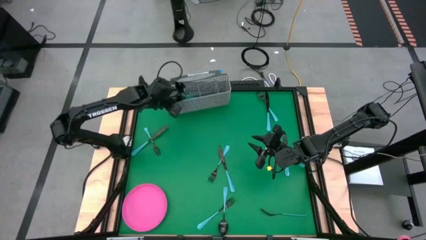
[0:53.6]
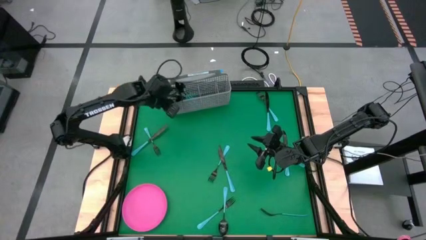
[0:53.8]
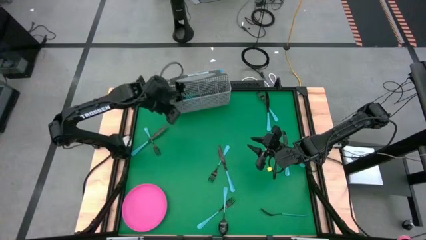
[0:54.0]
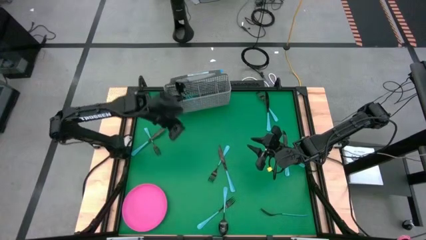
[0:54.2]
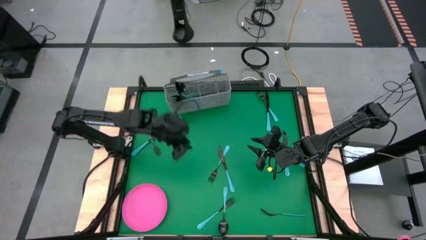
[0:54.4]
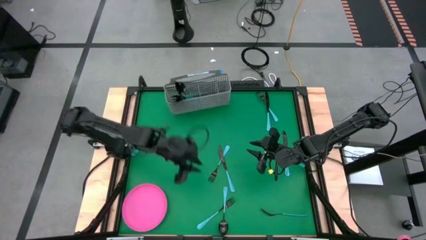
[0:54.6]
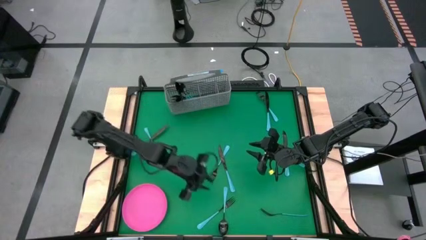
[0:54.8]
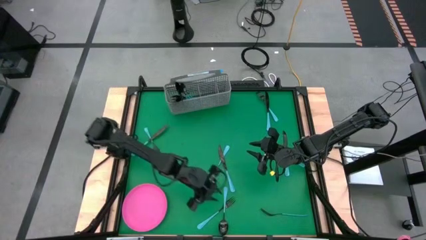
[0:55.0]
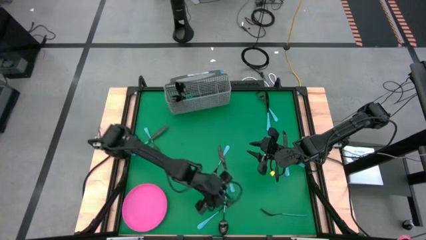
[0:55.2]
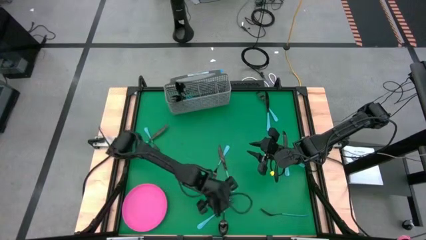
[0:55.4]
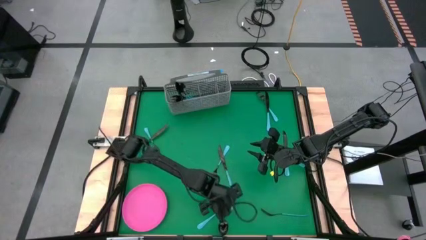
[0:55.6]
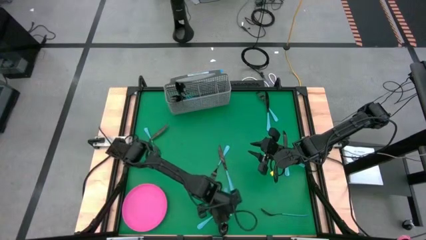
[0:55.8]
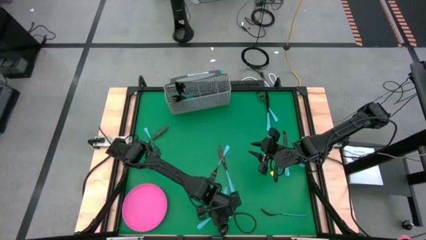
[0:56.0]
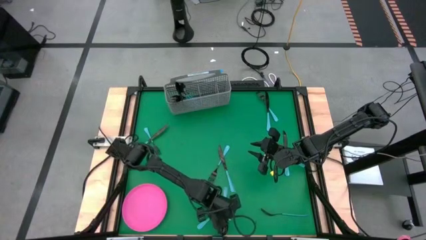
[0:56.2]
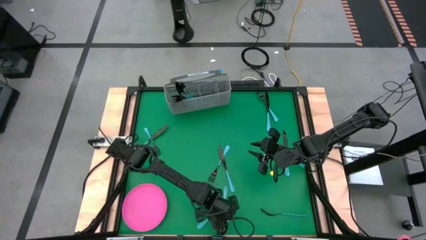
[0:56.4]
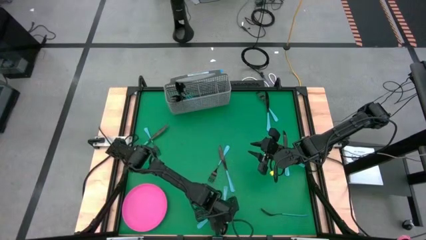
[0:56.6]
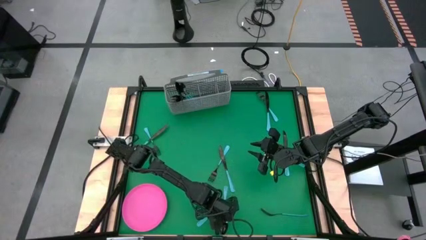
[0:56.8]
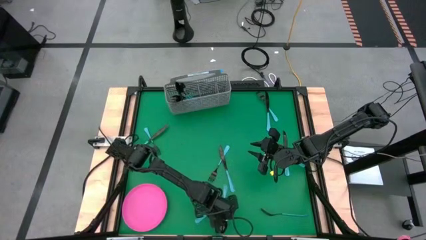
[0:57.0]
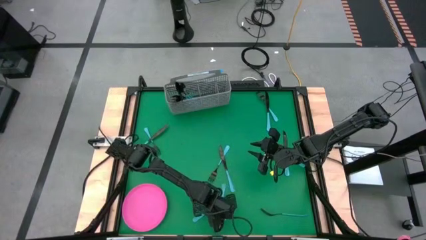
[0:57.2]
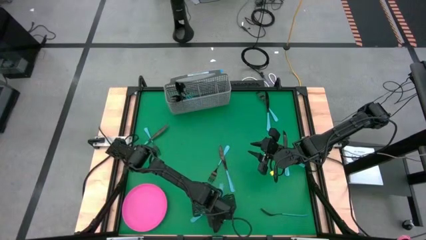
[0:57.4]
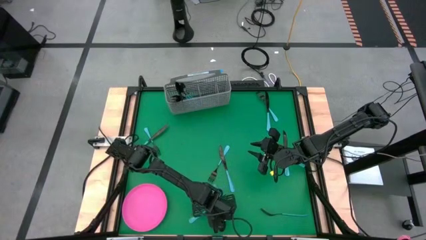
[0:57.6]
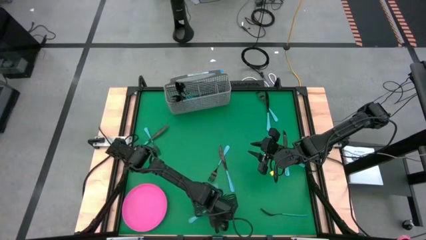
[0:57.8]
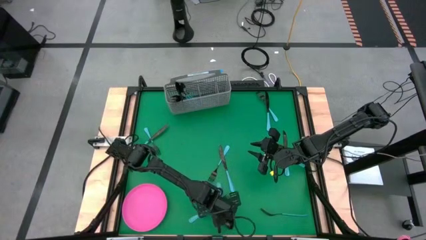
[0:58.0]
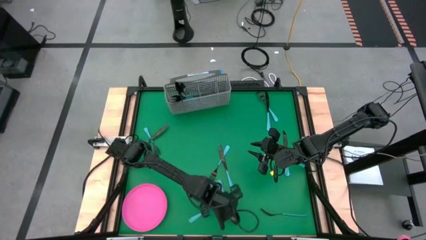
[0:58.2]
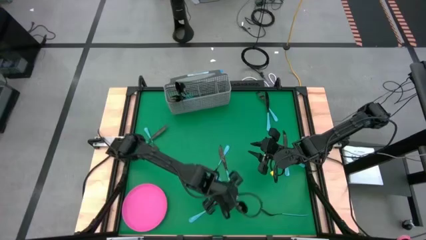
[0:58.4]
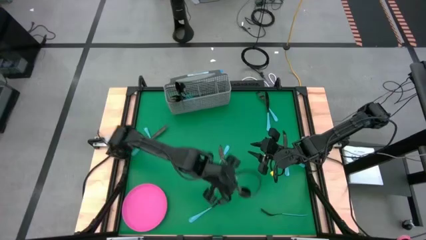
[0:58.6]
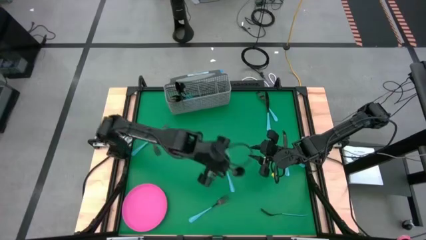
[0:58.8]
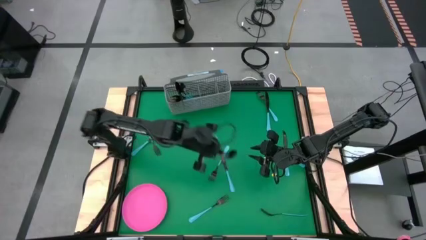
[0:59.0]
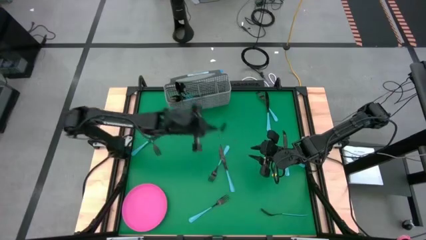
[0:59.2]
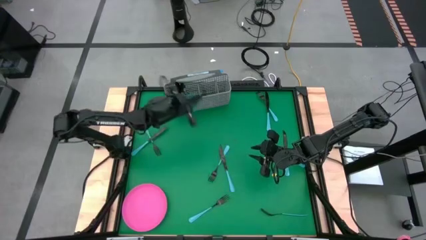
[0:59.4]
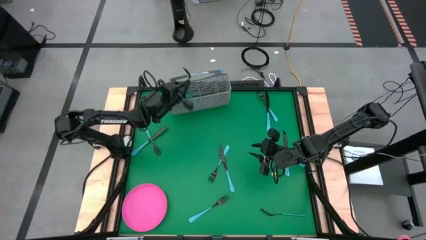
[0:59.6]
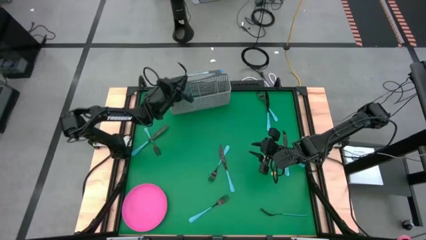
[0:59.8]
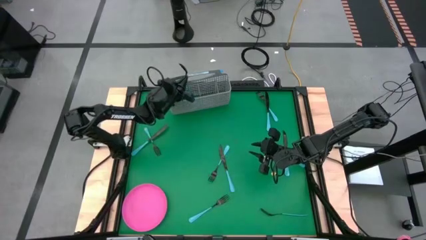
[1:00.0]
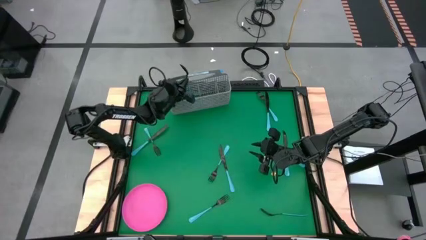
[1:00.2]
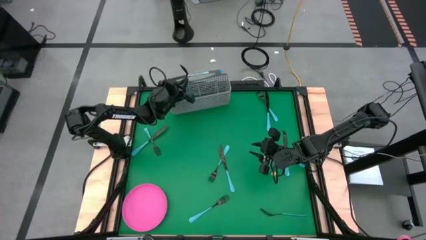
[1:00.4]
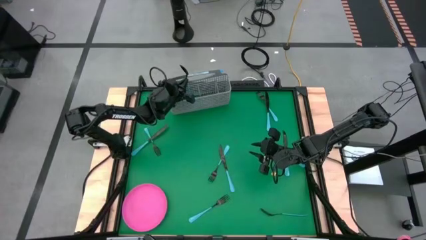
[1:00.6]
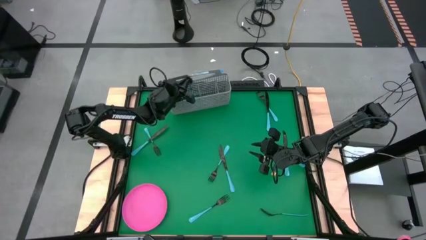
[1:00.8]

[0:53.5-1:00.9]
Task: Sort silverware
Put the blue spoon into the silverware basket

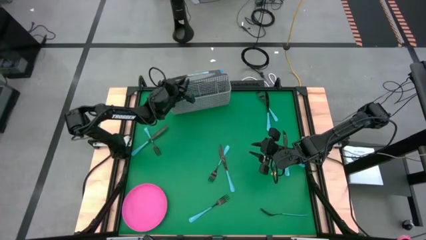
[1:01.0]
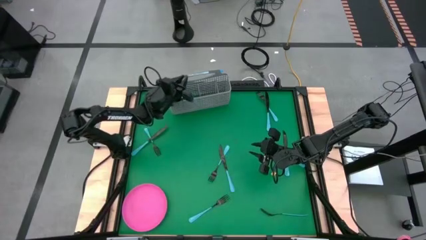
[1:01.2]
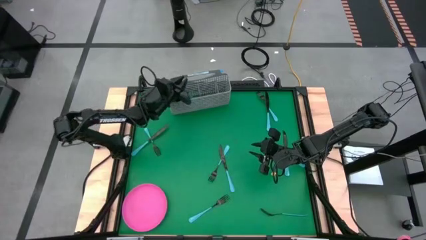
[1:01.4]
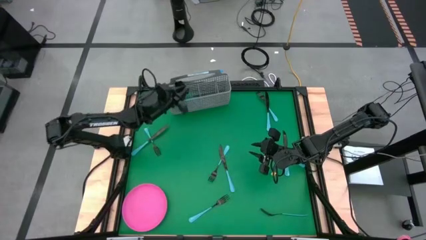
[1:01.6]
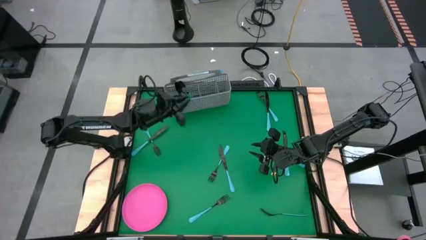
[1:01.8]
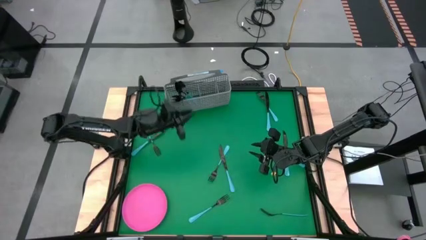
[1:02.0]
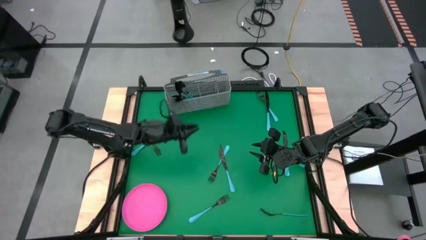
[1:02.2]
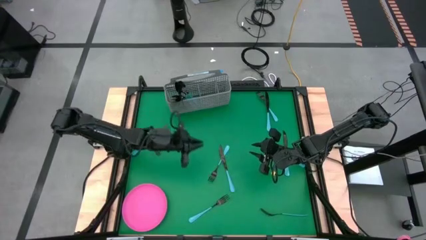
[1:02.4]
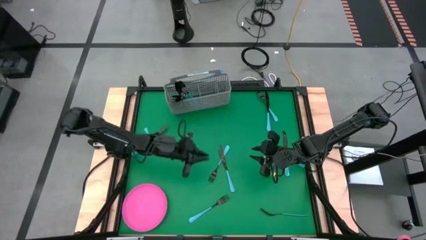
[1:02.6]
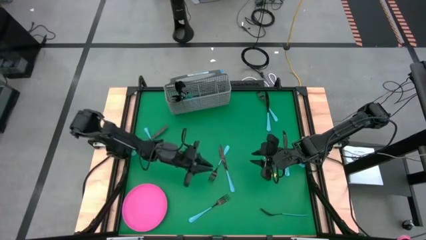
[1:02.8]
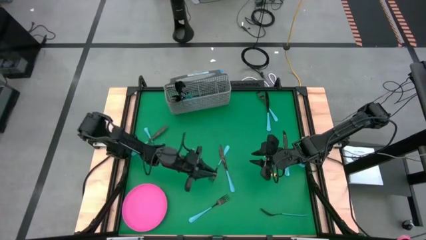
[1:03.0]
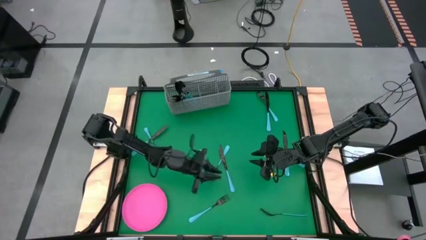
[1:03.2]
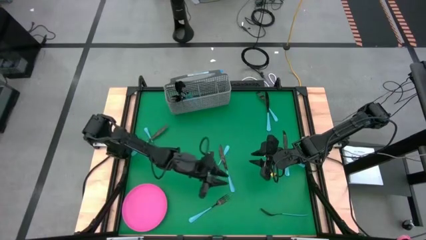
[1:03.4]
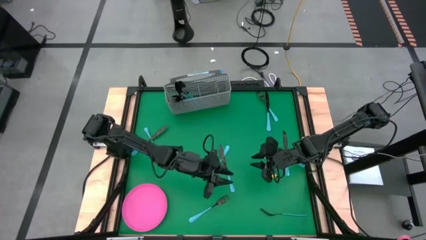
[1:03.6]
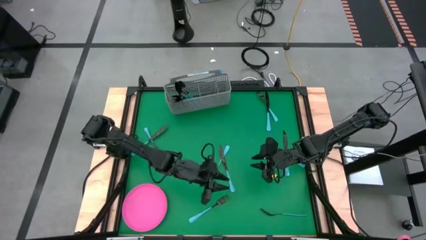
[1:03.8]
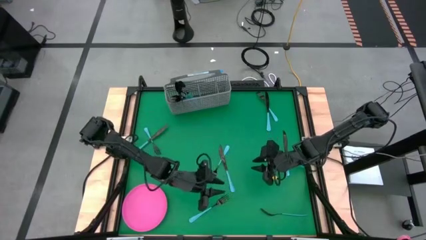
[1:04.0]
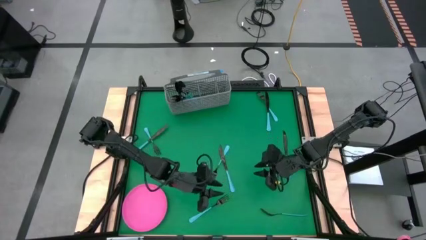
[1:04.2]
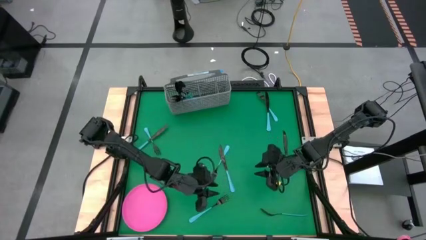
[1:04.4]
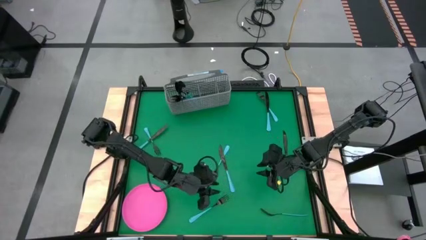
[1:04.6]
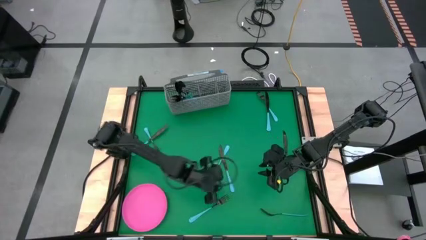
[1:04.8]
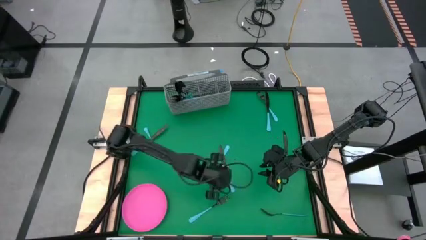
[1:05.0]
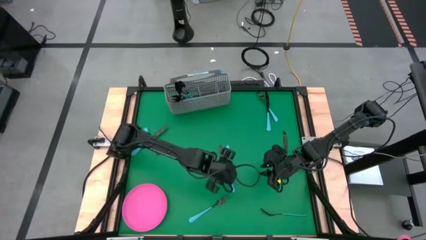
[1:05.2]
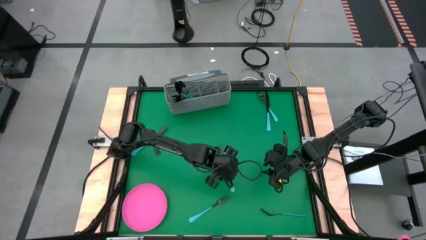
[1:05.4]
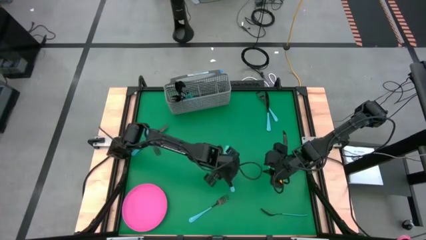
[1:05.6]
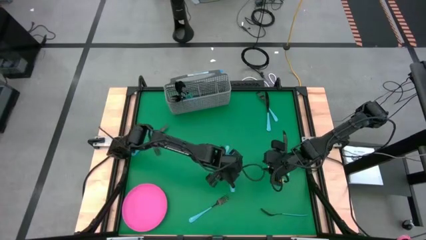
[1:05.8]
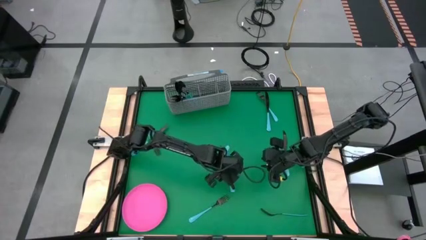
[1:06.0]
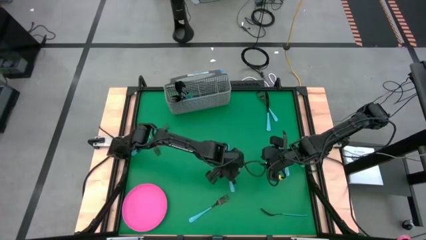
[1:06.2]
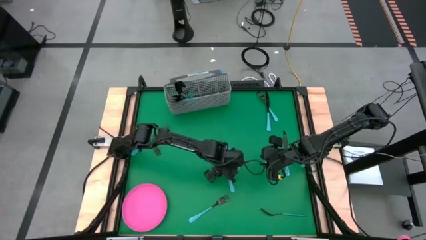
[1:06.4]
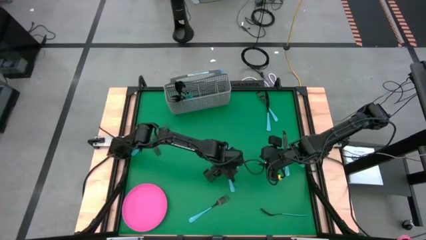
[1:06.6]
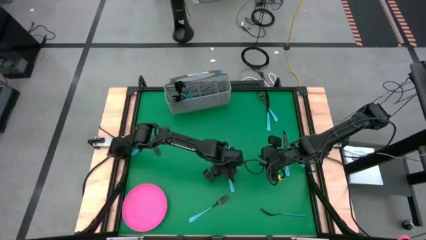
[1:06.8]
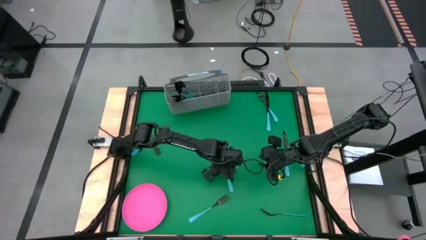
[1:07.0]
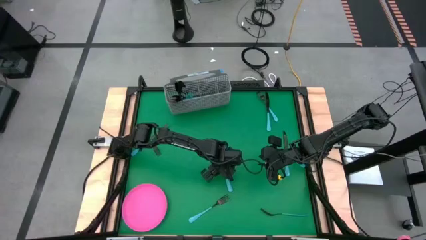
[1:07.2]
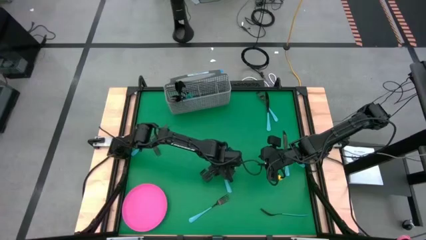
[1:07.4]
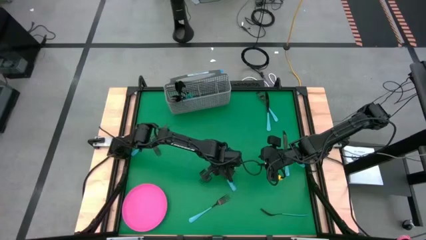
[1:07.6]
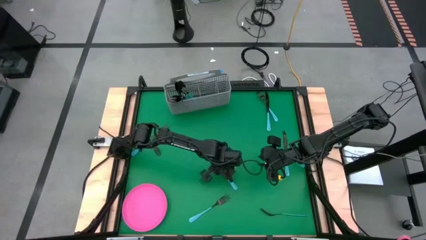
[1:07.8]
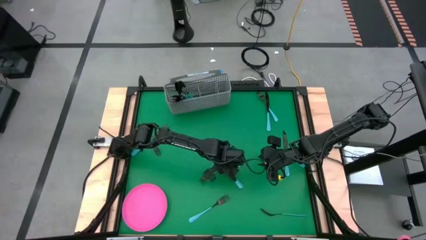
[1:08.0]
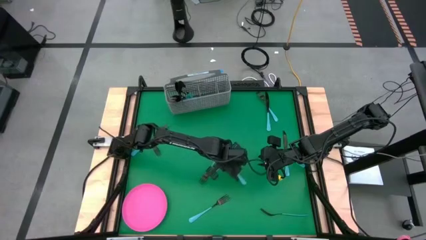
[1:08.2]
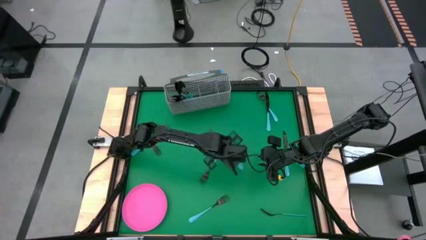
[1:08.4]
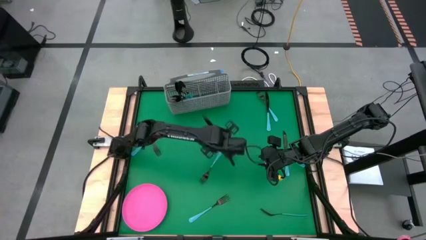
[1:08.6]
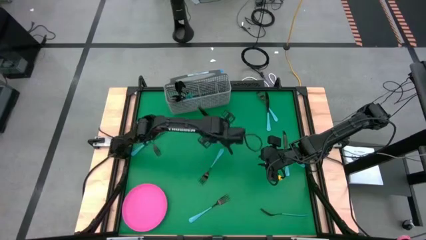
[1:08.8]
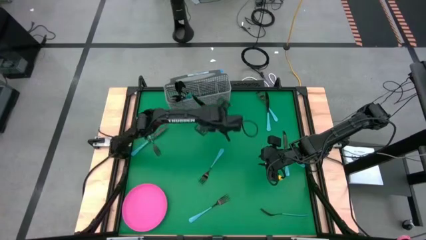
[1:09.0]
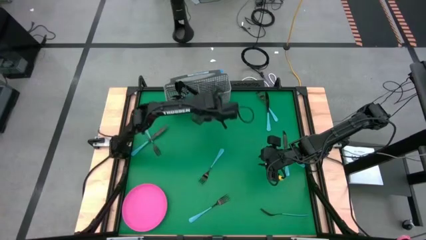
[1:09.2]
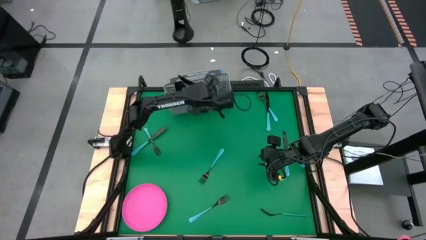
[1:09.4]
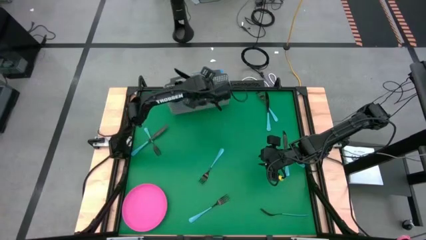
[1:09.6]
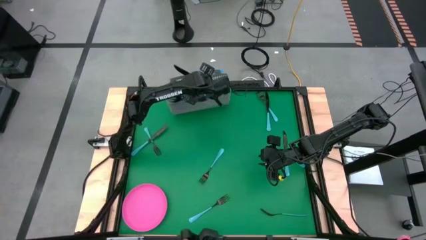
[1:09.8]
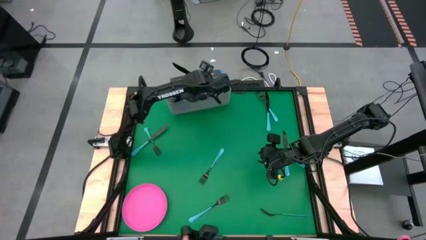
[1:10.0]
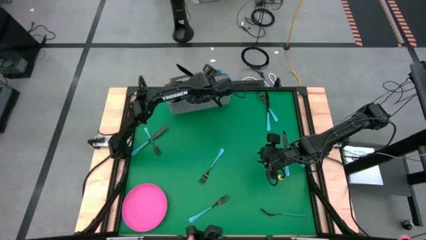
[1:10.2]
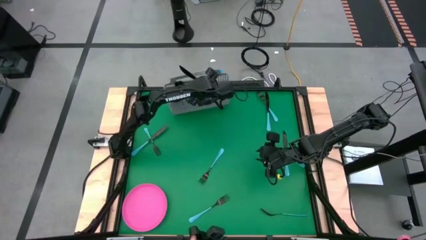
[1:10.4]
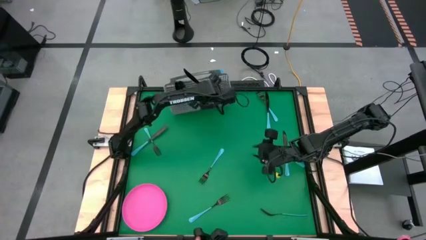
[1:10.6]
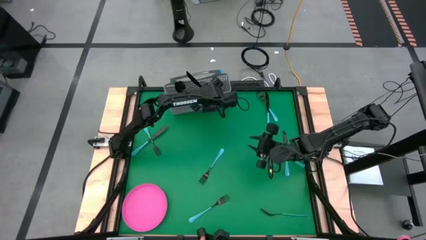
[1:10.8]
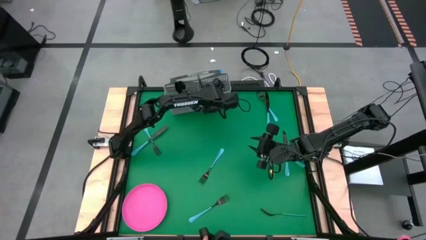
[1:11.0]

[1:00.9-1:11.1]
Put the blue table knife into the silverware basket
